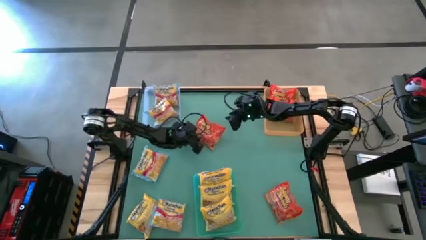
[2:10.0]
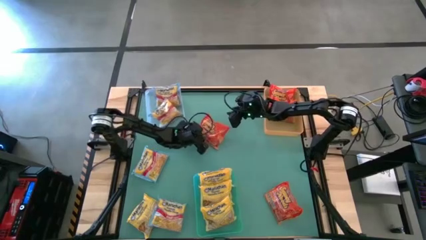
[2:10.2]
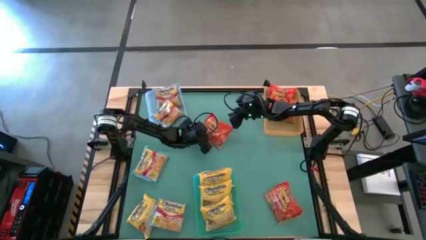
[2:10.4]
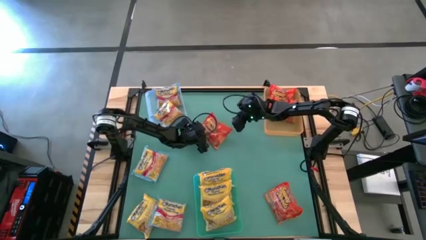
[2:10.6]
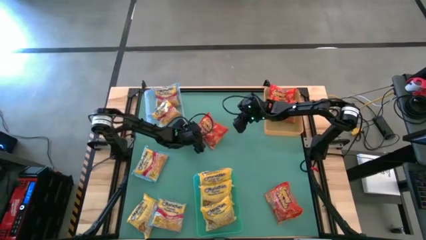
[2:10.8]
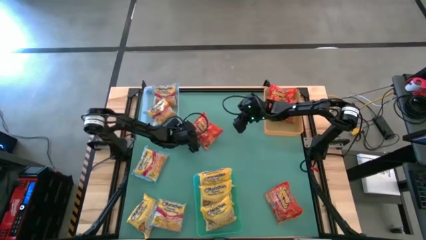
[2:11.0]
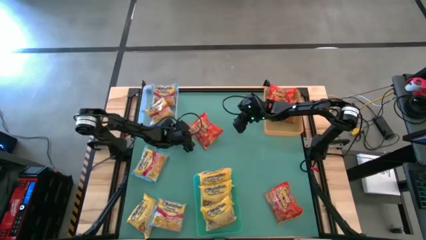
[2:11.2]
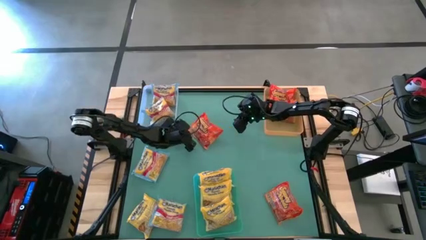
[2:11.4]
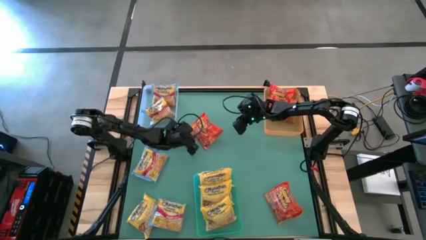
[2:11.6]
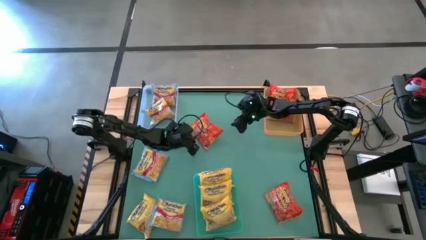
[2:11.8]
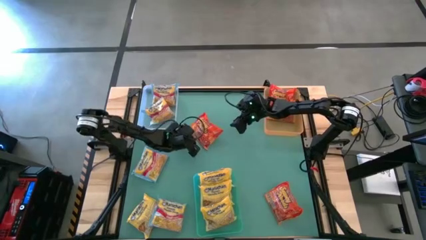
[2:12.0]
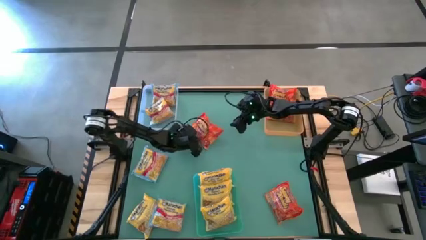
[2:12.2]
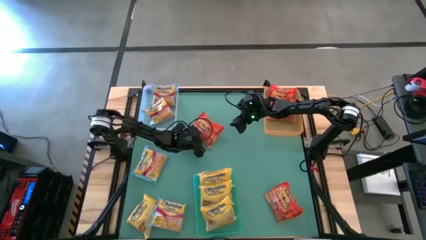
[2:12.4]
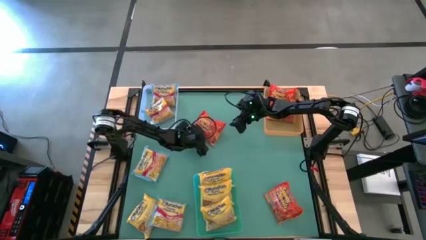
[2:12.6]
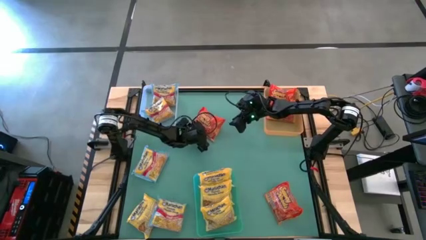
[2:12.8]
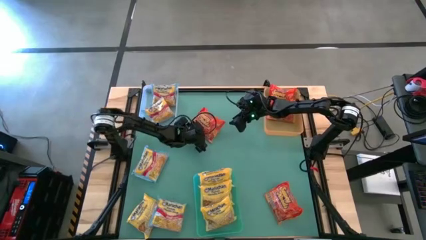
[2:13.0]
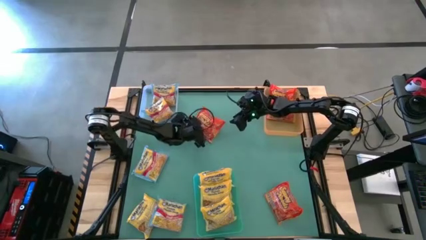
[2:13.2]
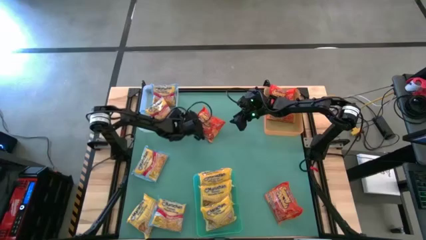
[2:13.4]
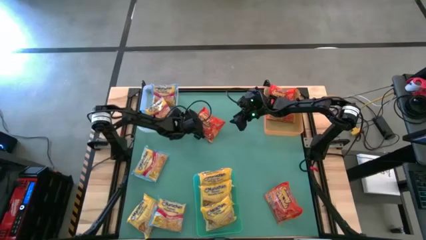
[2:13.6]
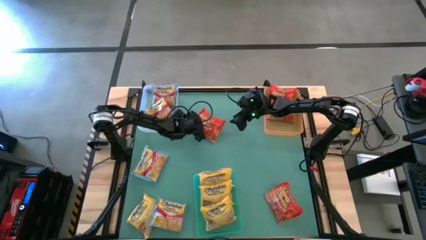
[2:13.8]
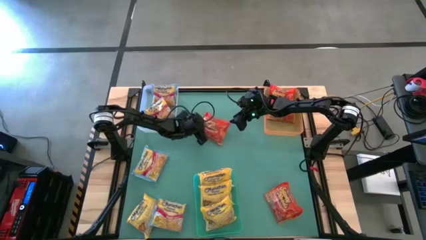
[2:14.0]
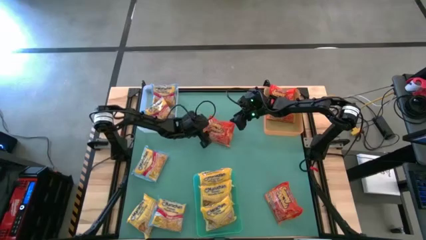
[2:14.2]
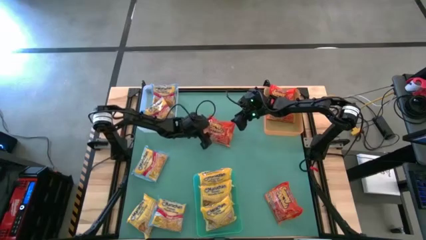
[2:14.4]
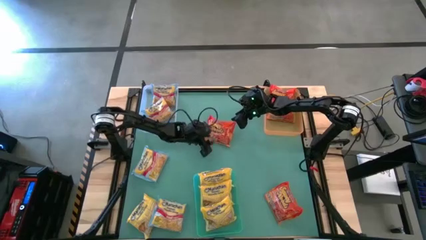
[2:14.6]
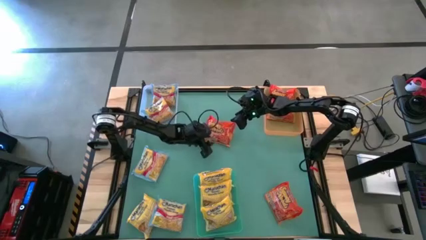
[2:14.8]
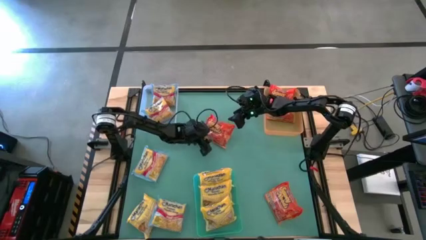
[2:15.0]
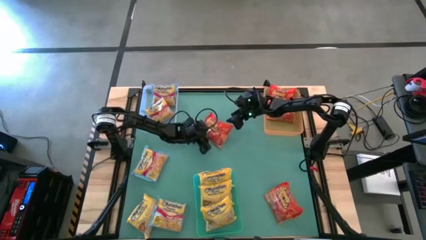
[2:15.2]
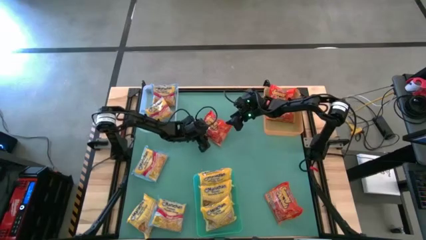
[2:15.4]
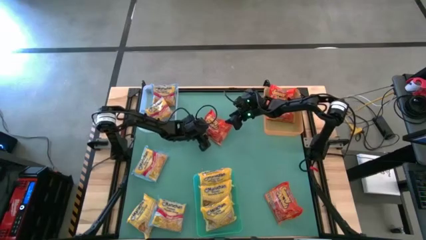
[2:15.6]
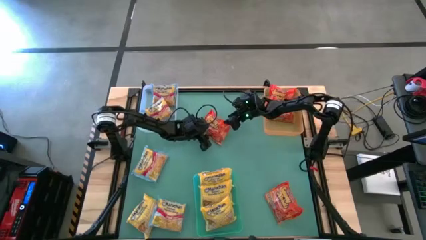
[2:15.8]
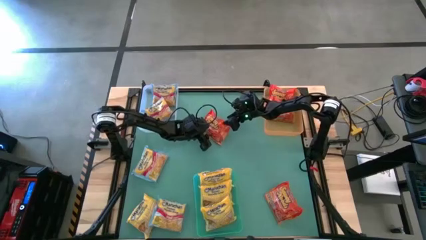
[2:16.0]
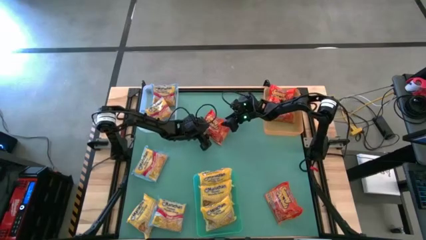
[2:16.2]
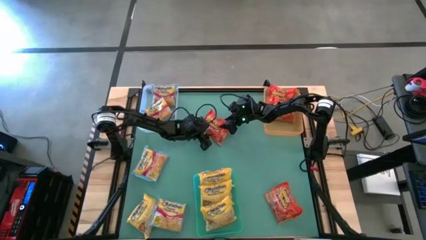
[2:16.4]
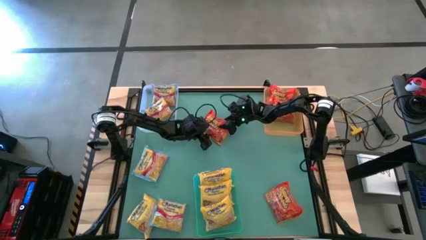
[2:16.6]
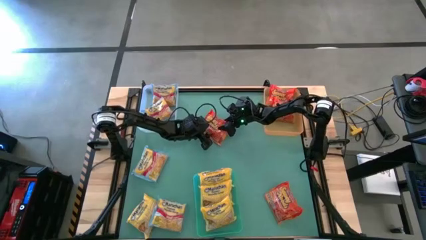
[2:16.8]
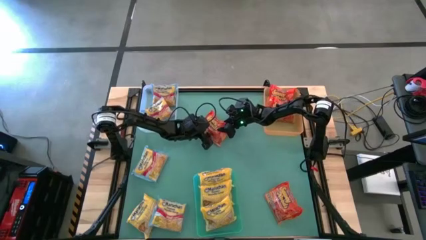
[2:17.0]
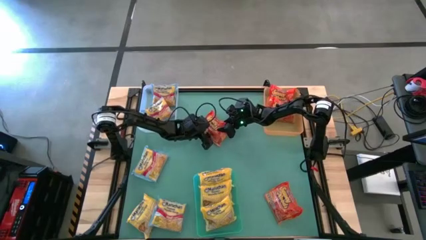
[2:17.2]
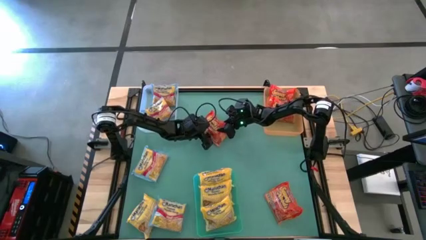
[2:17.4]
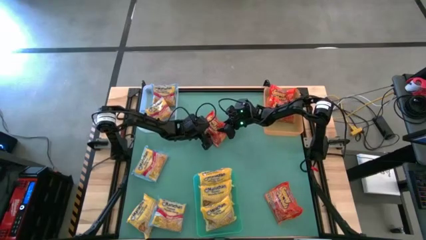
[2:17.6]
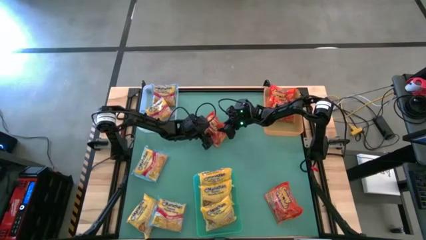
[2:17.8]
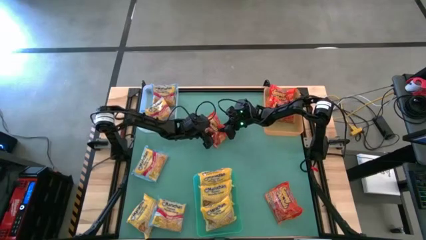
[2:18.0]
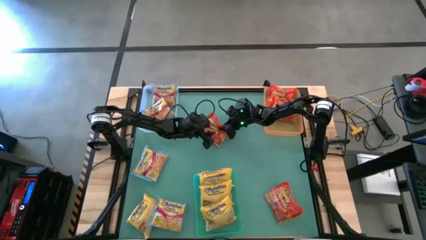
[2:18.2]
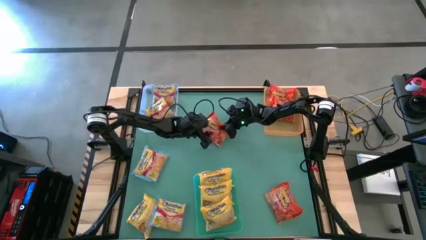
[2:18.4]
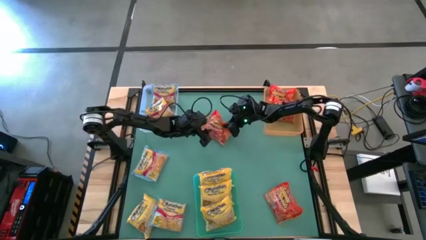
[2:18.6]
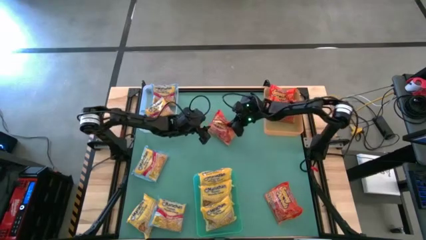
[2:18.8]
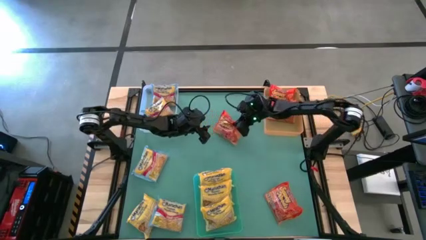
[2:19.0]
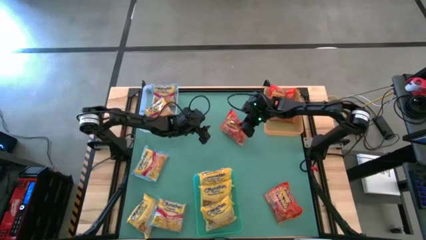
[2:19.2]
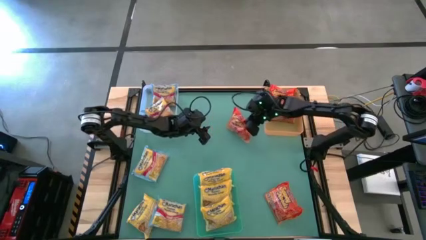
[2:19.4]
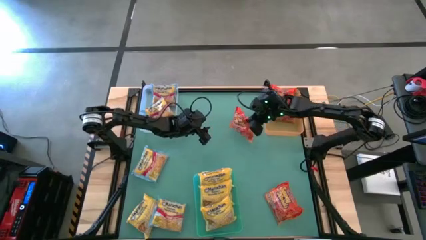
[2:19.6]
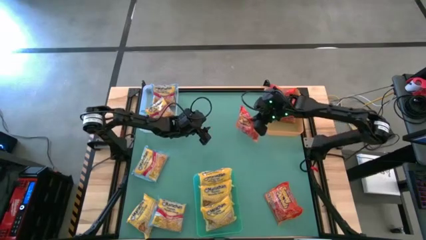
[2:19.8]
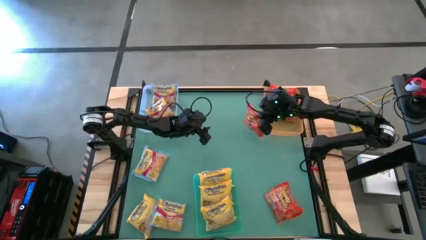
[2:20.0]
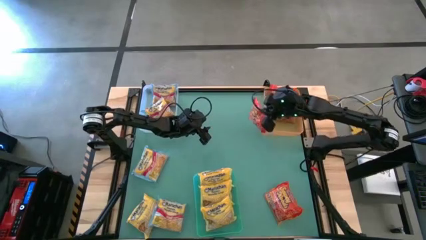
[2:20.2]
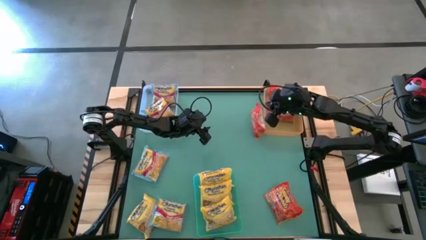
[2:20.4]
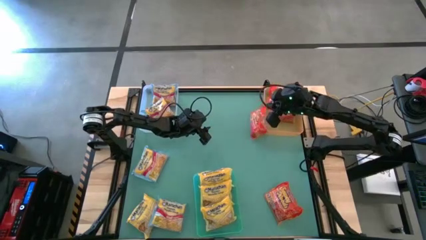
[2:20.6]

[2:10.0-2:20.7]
Task: Sort Maruchan noodles
Put the top red noodle pack into the orange bin

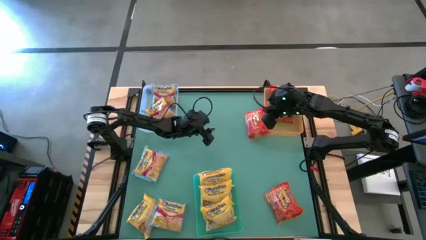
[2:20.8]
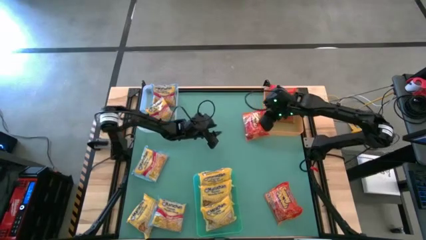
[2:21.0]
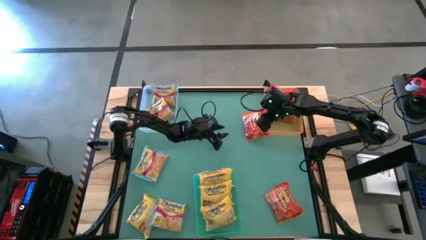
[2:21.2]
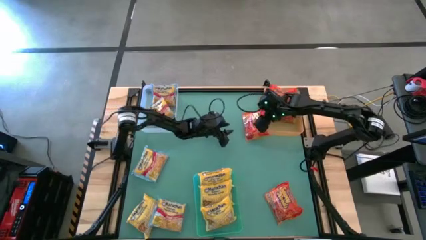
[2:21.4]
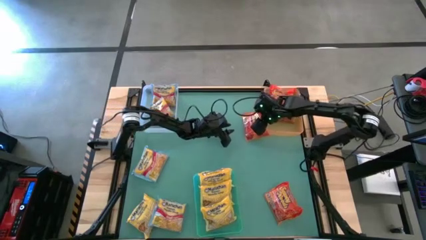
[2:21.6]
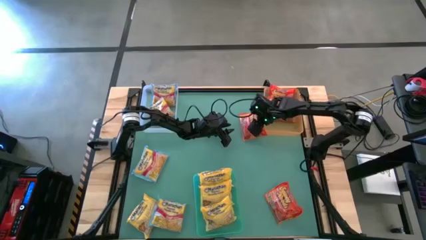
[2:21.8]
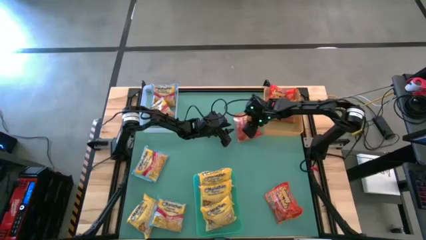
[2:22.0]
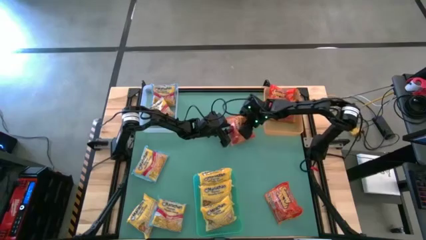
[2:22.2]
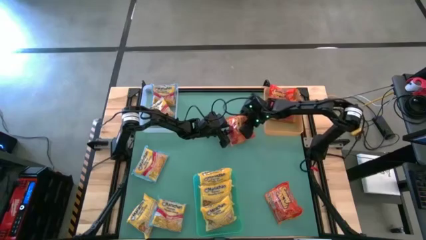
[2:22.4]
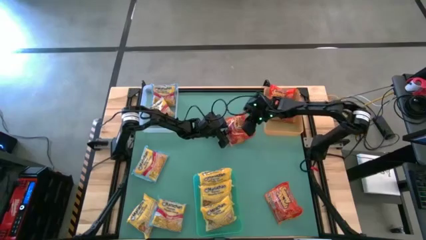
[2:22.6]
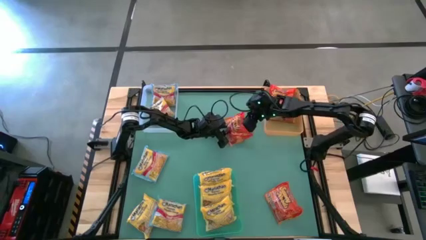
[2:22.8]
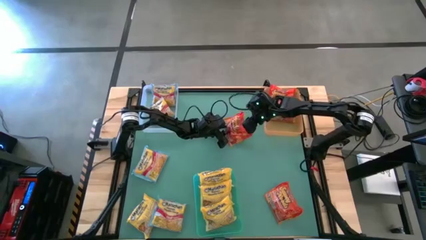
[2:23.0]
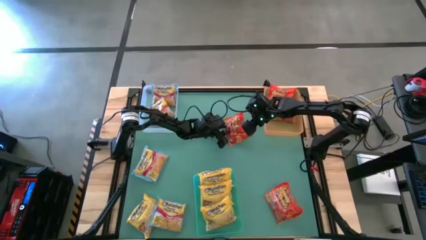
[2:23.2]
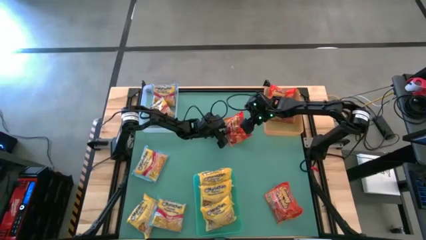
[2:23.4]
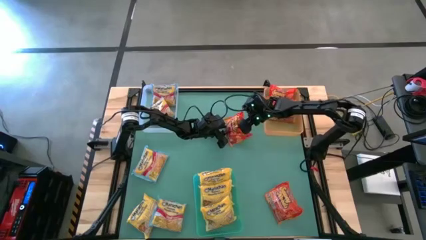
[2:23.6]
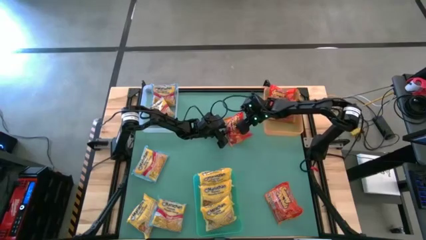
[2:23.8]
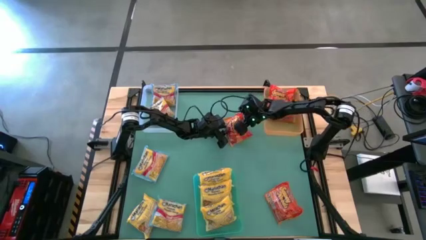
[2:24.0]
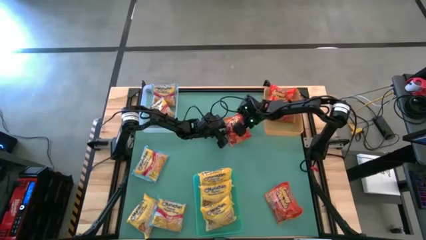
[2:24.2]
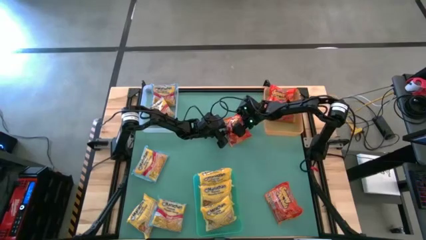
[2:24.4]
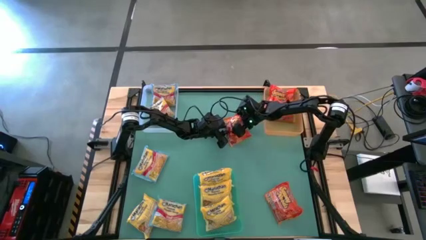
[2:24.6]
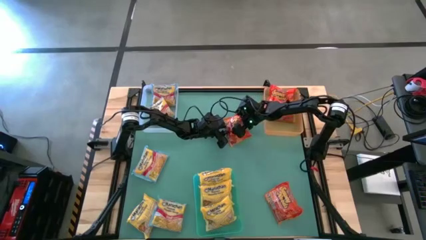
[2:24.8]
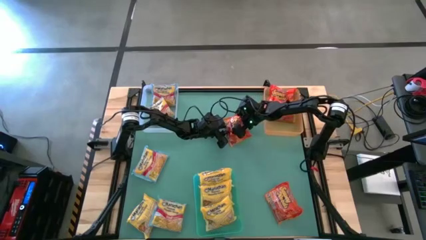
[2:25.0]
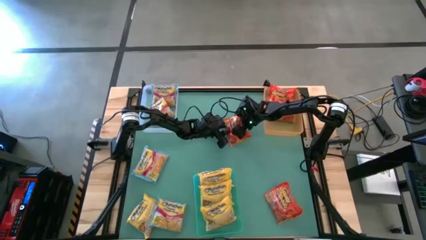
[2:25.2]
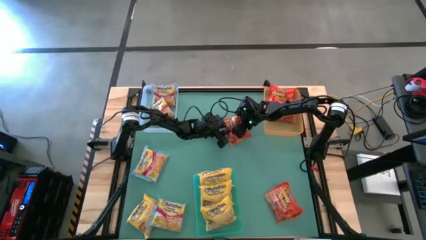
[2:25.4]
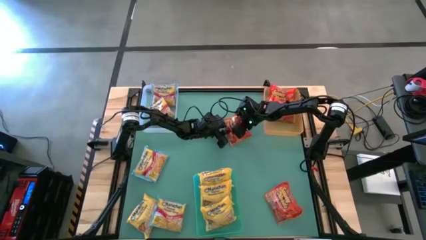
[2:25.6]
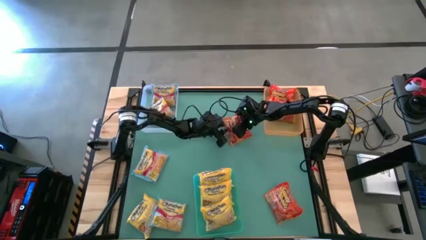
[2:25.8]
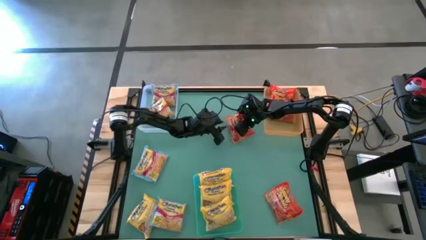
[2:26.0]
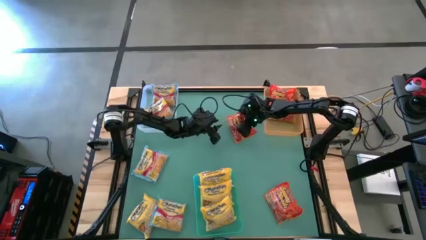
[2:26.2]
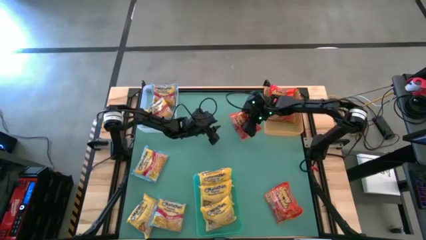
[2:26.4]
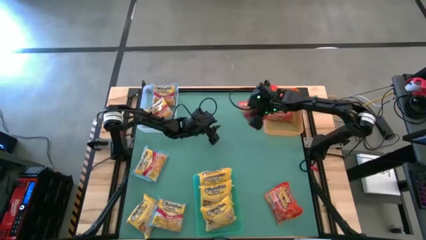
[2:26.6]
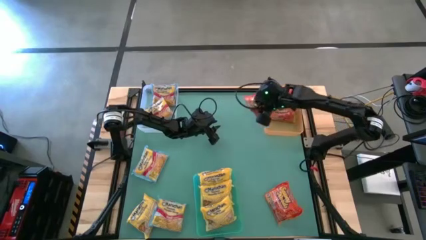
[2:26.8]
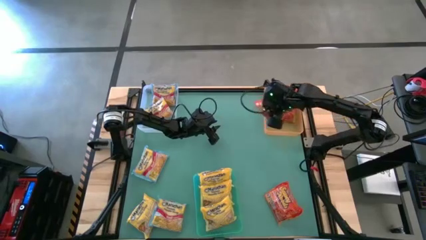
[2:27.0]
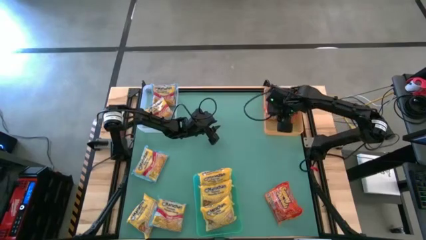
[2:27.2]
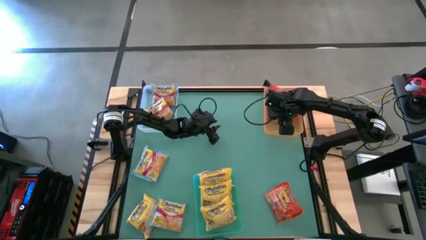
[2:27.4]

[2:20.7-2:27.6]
Put the top red noodle pack into the orange bin
